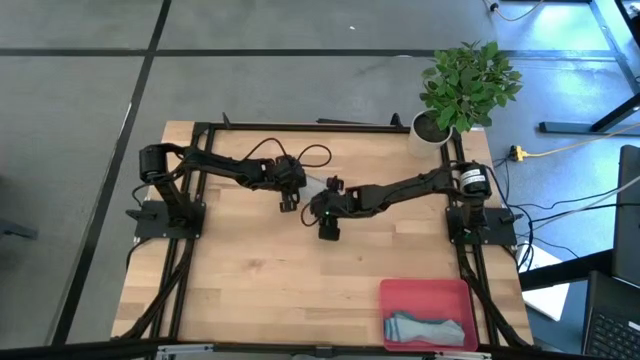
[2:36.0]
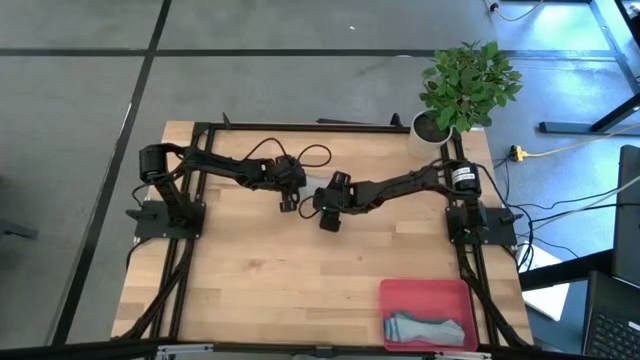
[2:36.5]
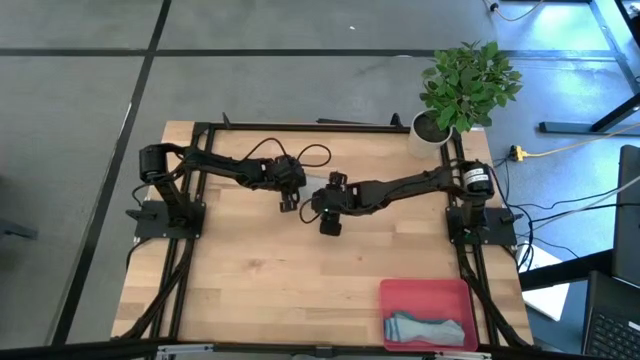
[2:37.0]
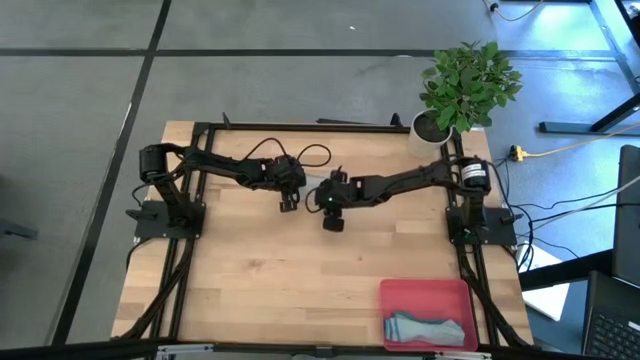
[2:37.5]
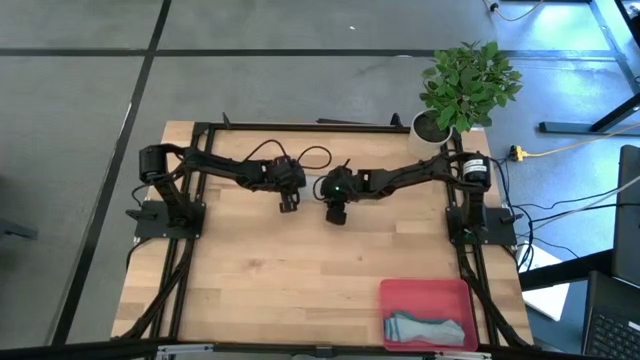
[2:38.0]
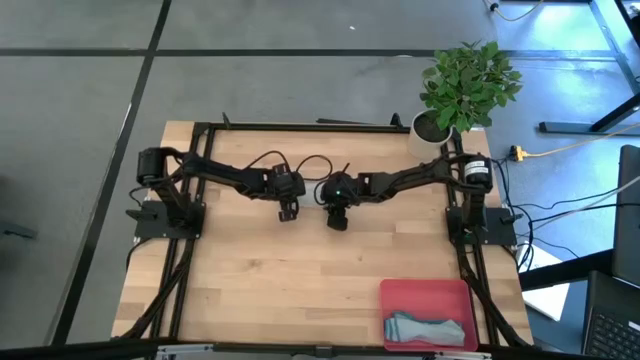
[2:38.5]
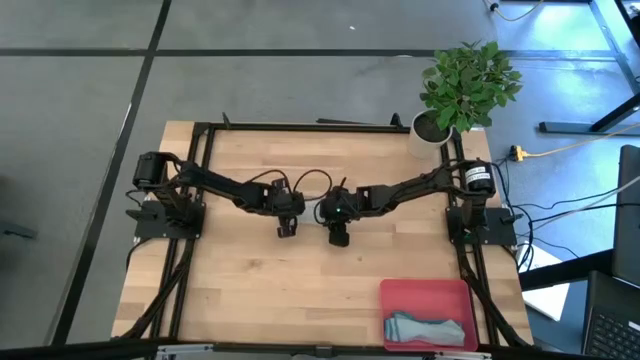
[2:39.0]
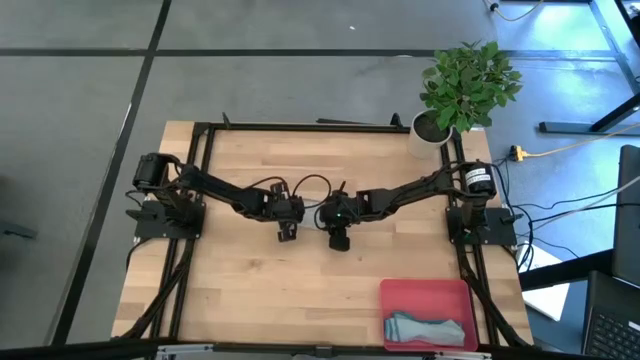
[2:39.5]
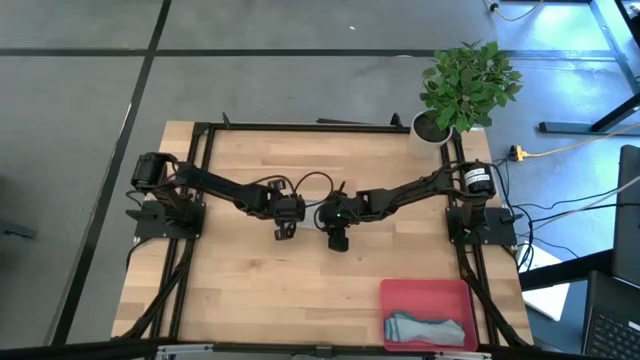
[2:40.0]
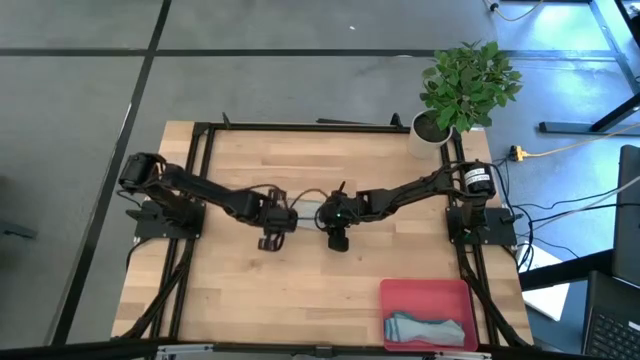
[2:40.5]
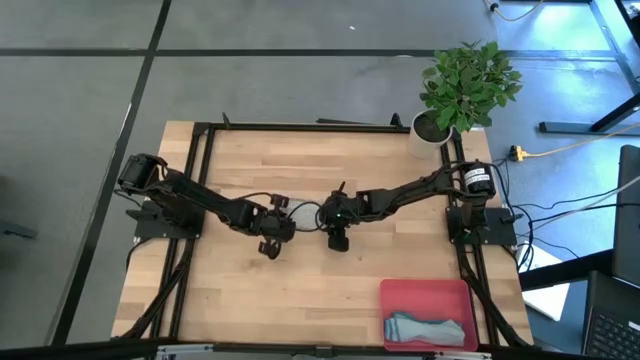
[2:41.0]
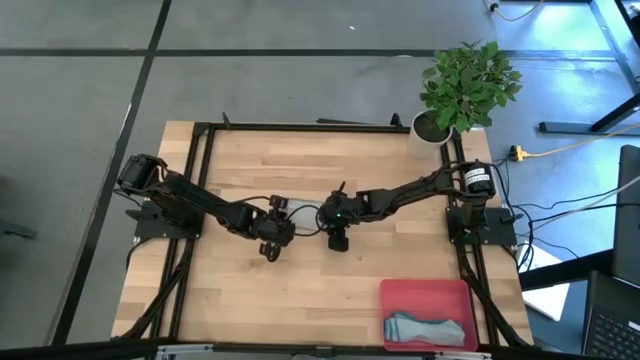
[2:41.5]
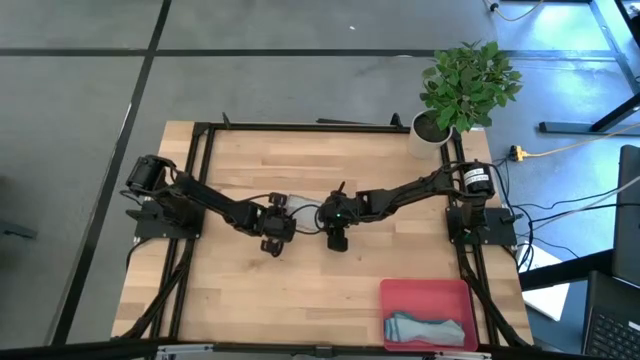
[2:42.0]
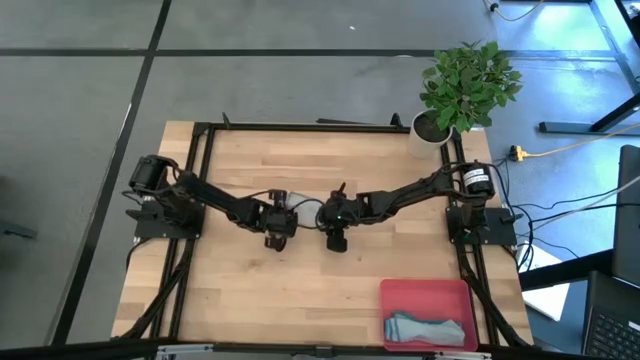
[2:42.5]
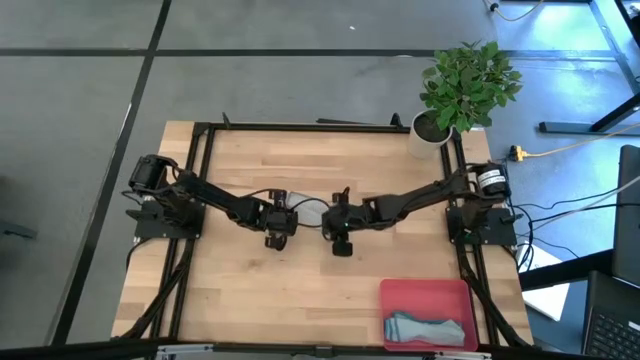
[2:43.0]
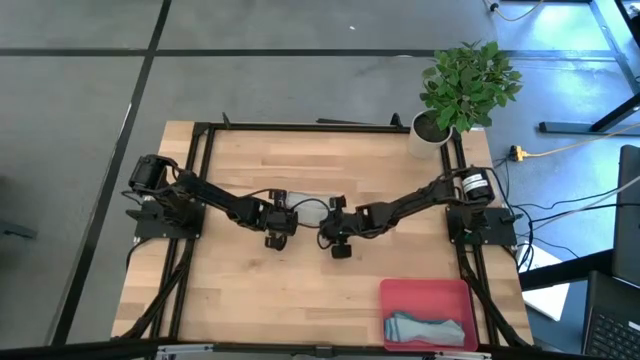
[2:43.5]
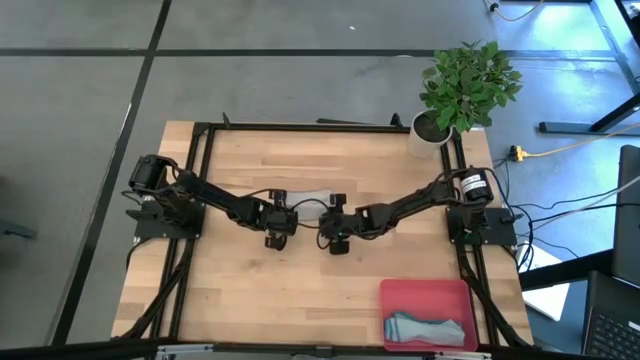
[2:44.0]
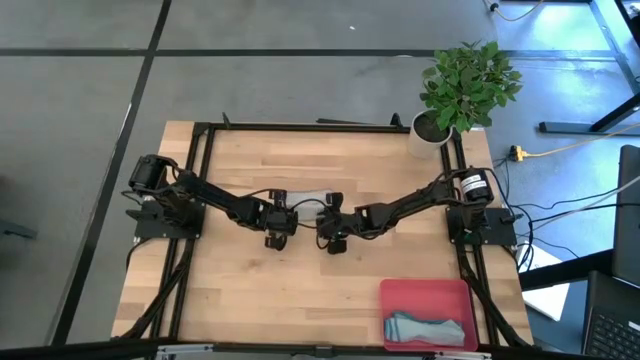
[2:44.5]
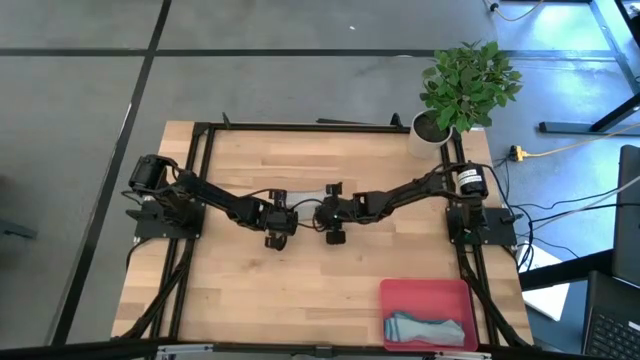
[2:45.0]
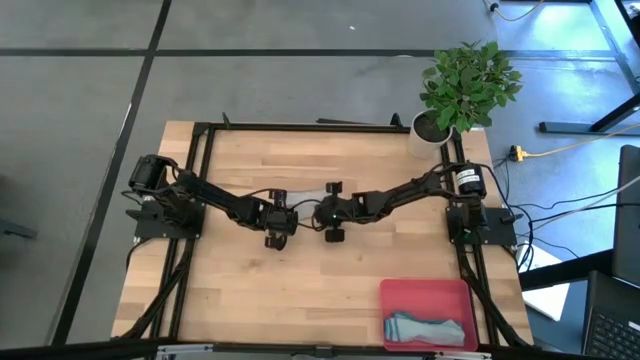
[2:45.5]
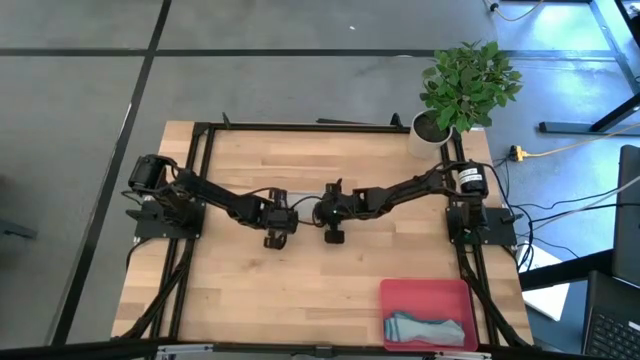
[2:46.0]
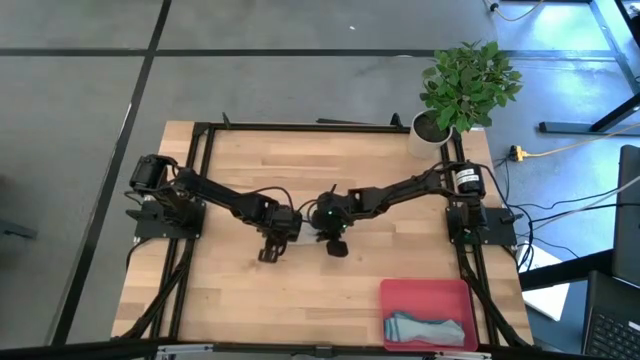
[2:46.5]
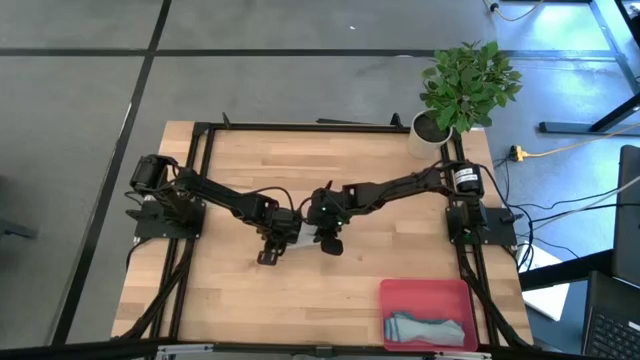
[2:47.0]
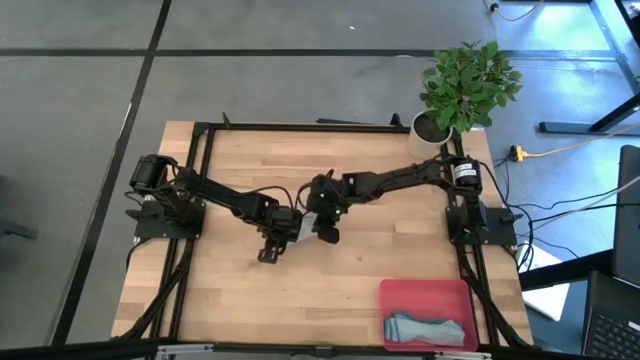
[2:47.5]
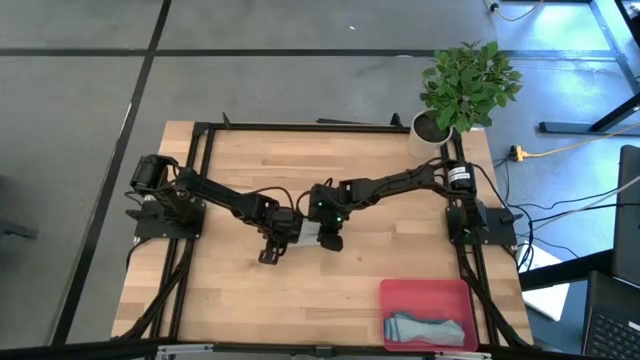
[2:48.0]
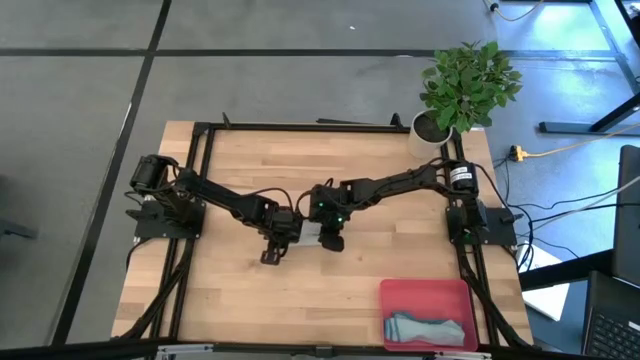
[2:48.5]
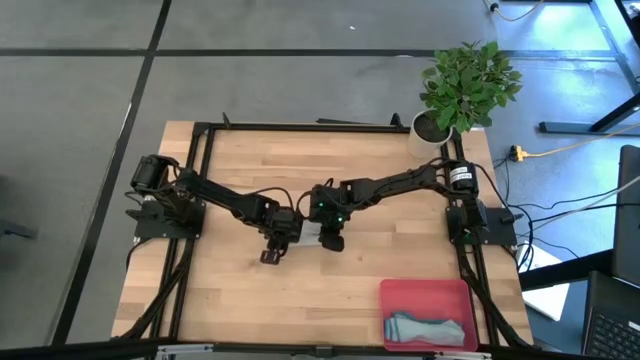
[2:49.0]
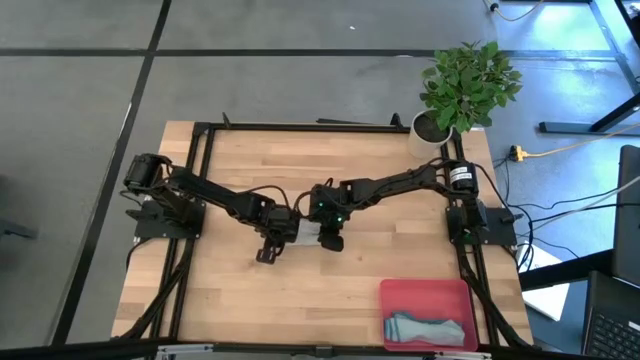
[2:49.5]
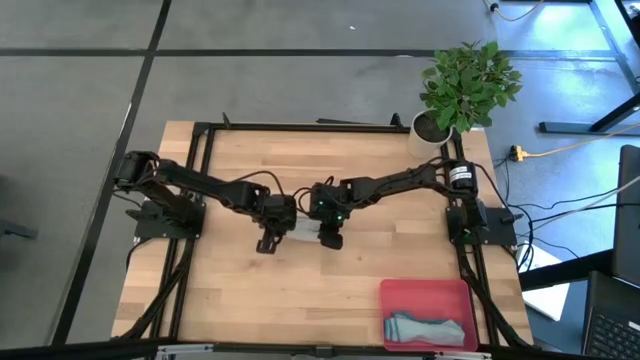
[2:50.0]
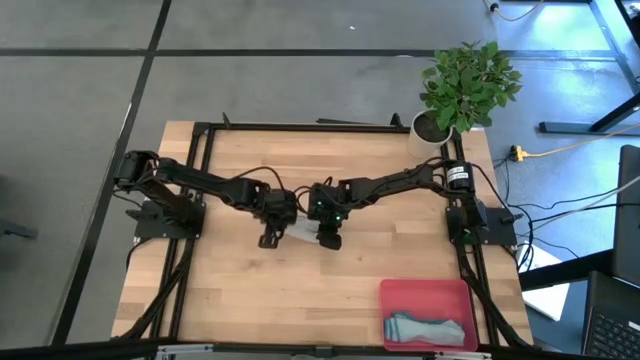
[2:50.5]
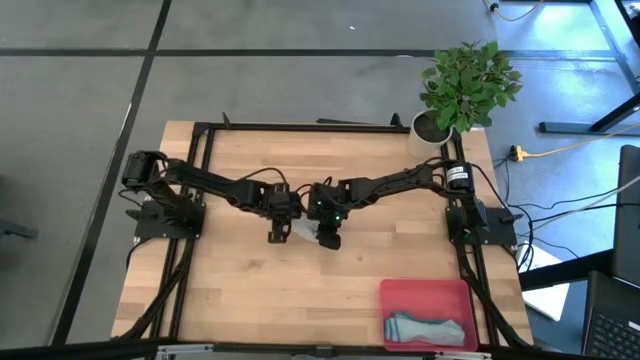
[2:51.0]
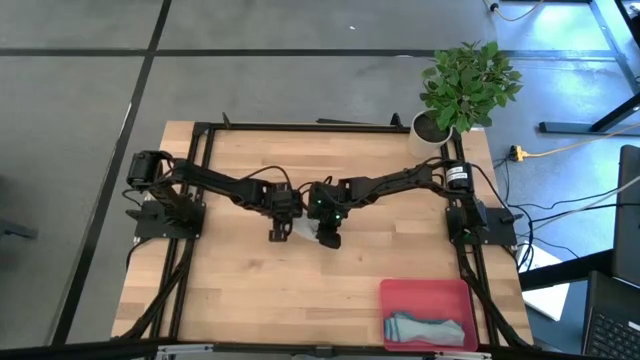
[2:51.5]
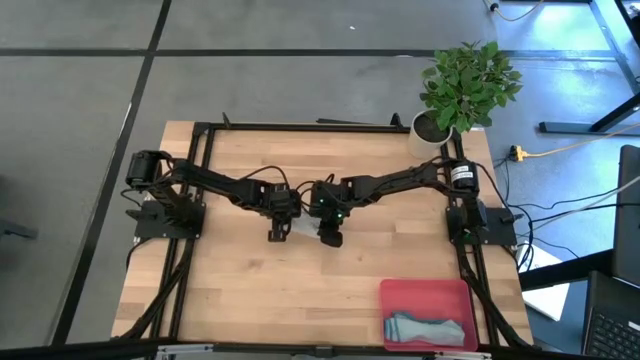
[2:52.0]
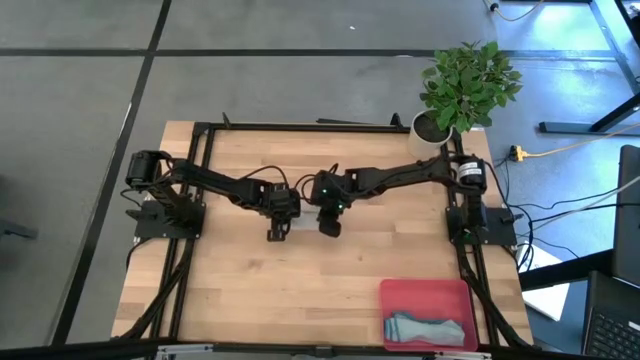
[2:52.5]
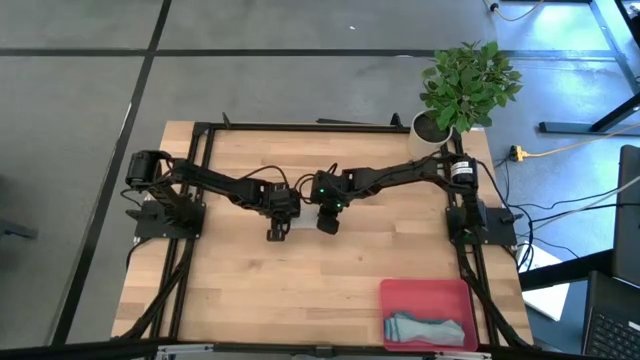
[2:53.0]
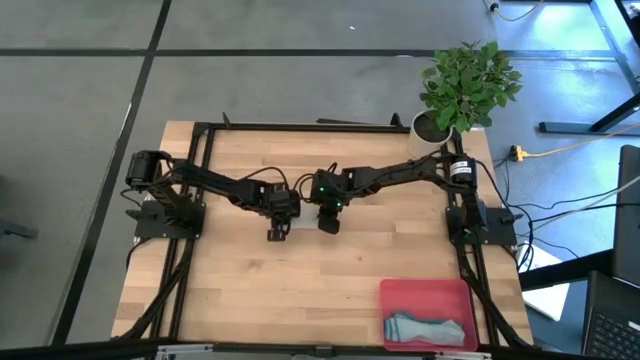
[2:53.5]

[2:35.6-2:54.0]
Task: Roll microfiber towels into tight, uniform cylinder then place into a basket
Roll the gray towel

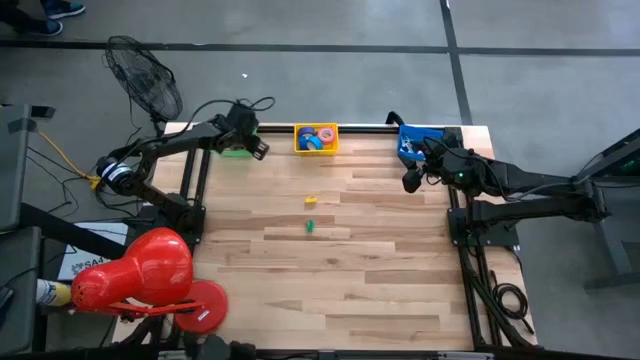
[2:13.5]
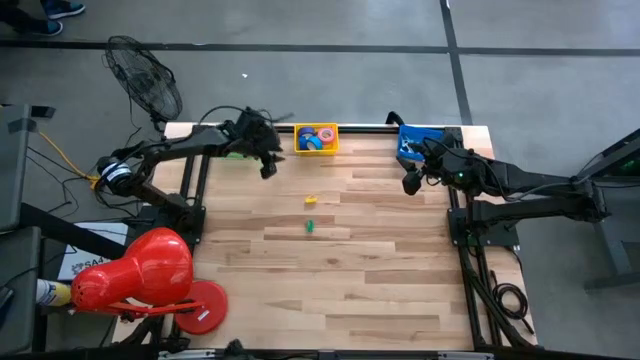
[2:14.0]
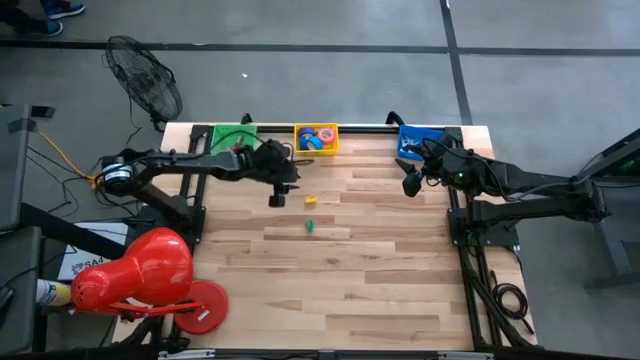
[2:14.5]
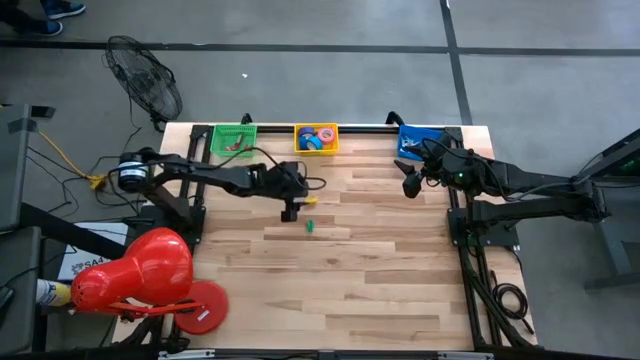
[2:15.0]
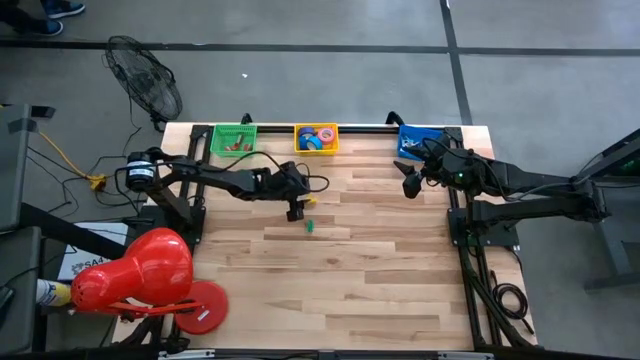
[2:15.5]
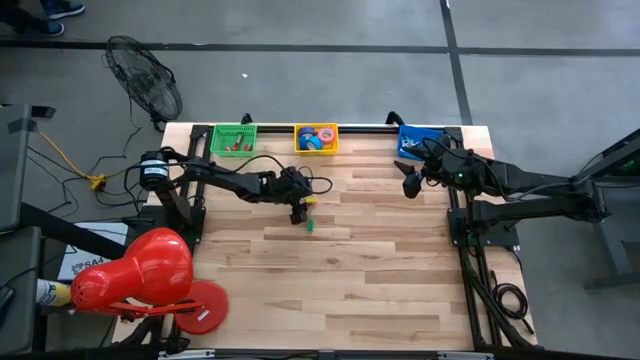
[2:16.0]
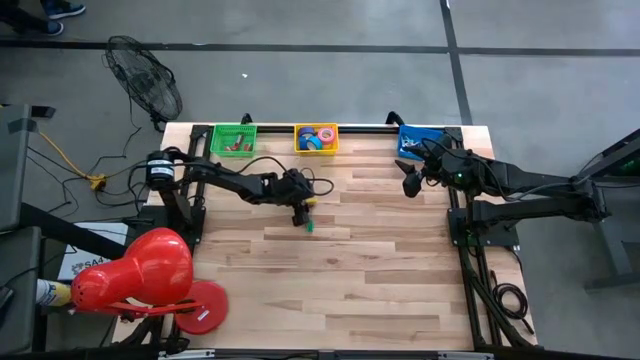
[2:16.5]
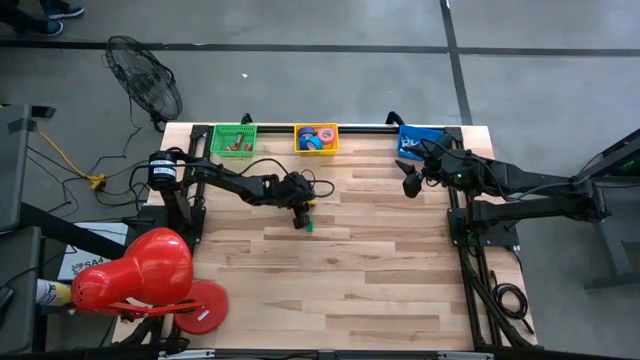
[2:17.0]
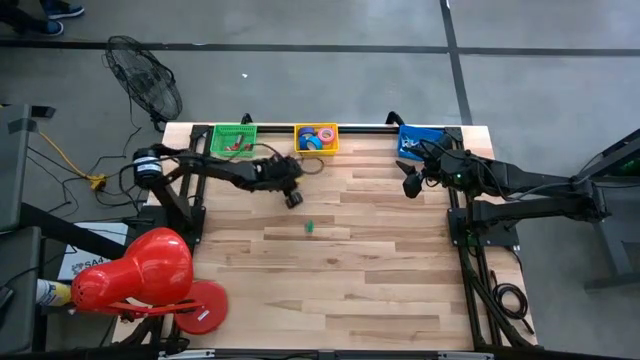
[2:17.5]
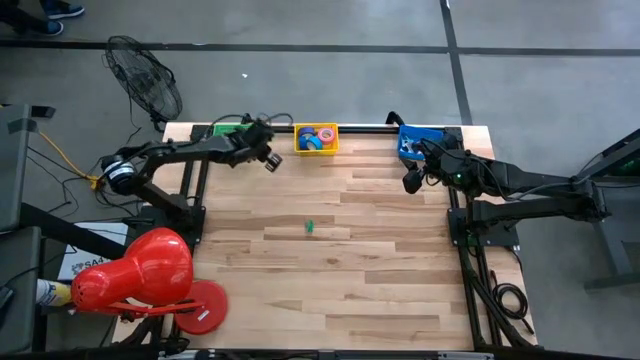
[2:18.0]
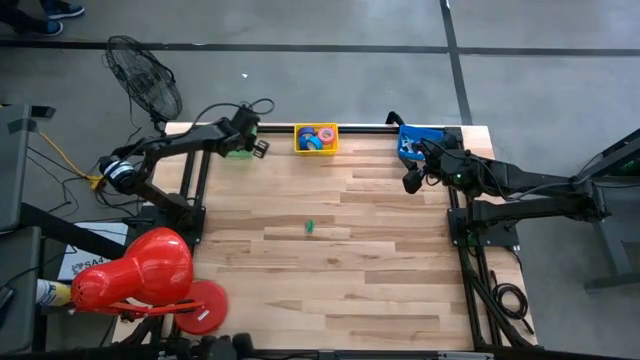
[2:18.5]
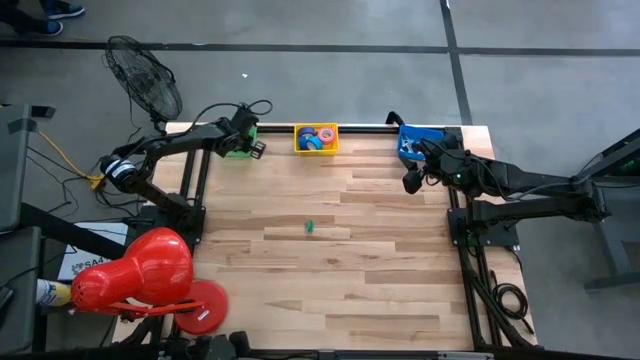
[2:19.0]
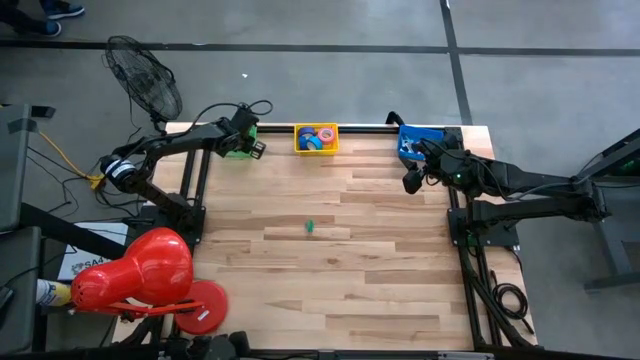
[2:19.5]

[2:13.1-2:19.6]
Task: Pick and place Stapler, Stapler remover, tape
Put the yellow stapler into the green bin
